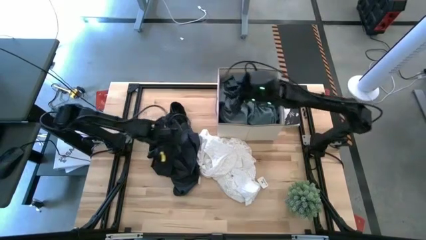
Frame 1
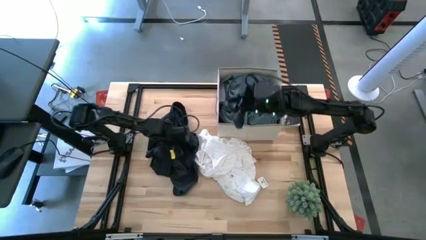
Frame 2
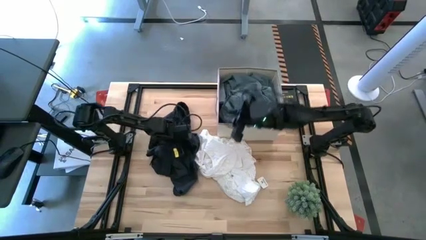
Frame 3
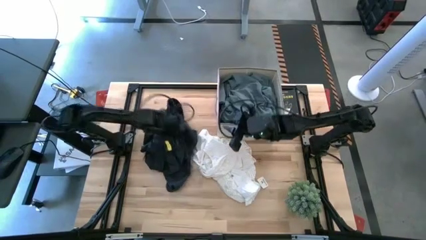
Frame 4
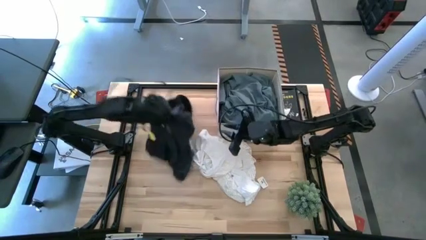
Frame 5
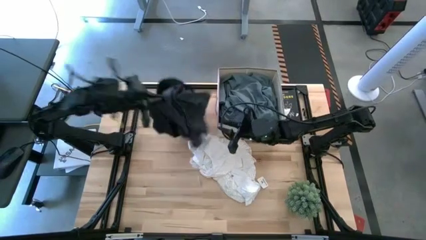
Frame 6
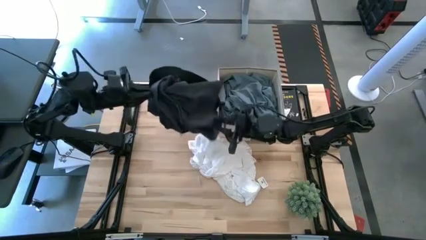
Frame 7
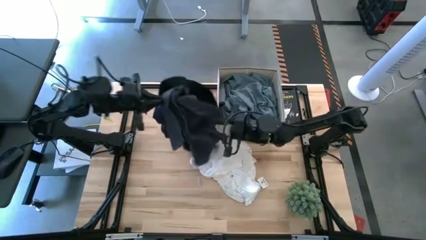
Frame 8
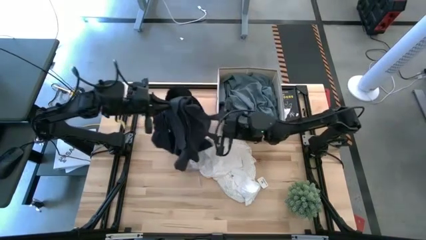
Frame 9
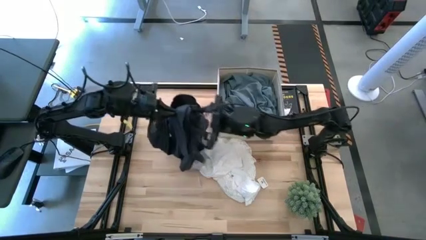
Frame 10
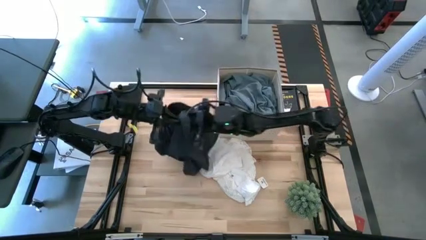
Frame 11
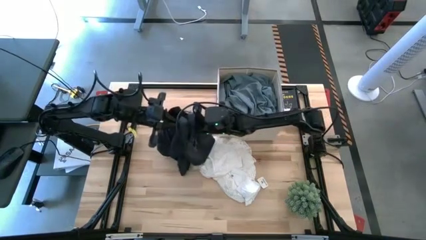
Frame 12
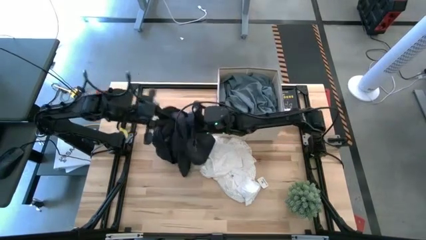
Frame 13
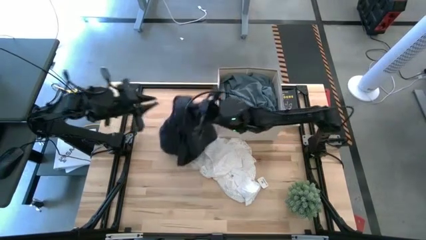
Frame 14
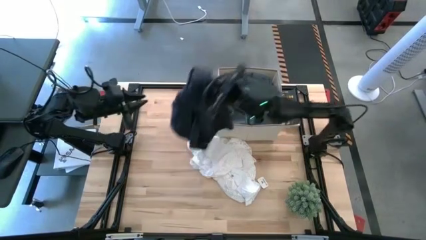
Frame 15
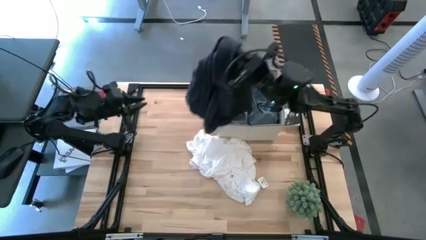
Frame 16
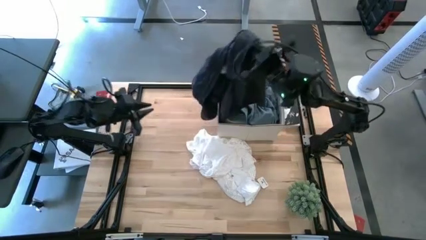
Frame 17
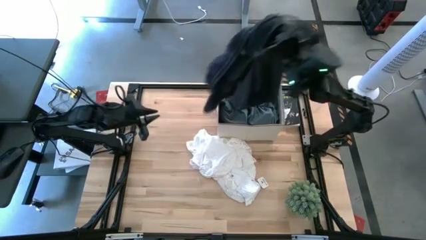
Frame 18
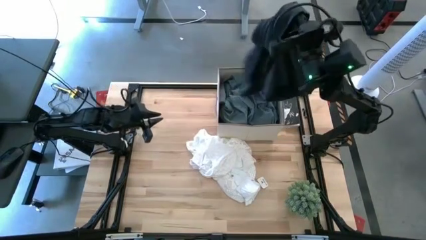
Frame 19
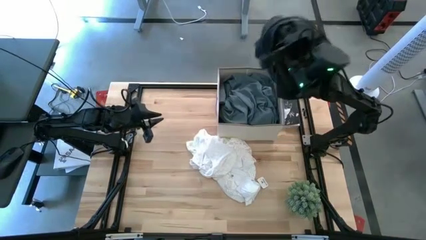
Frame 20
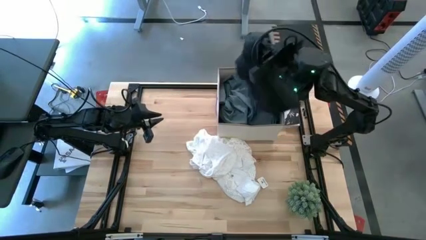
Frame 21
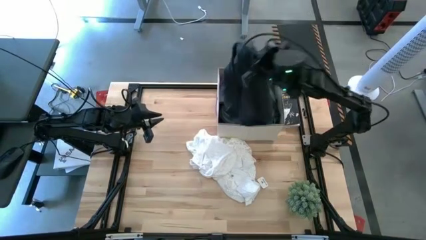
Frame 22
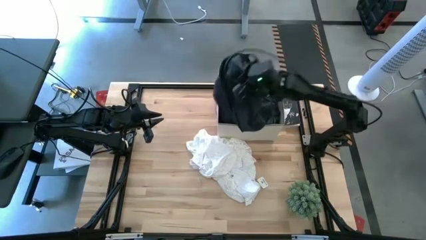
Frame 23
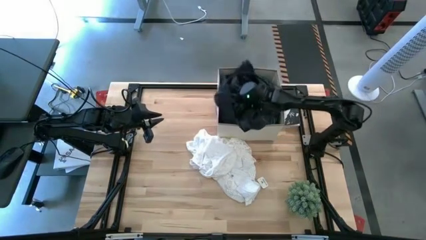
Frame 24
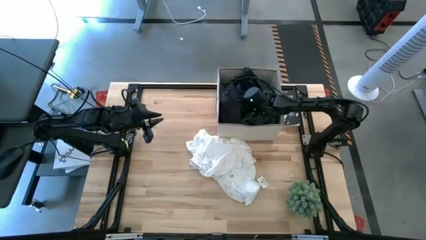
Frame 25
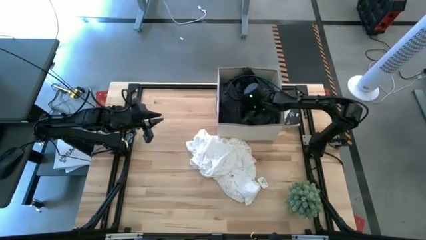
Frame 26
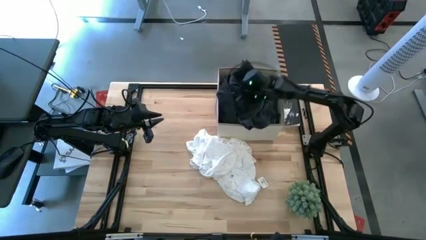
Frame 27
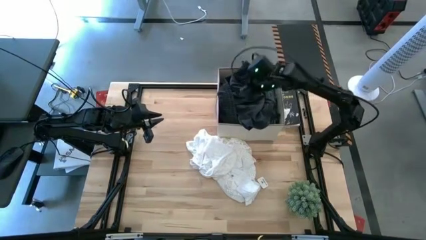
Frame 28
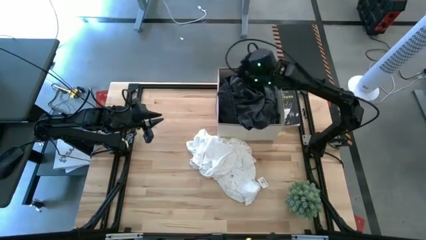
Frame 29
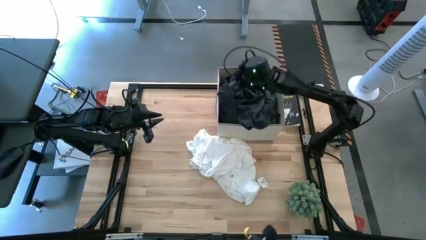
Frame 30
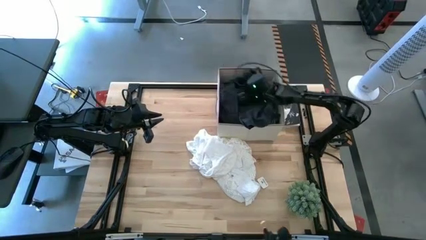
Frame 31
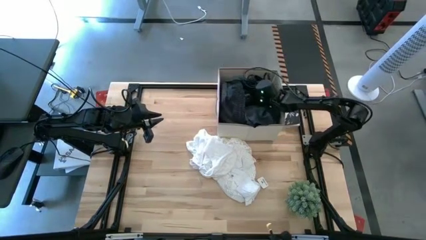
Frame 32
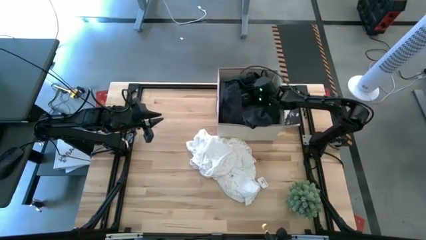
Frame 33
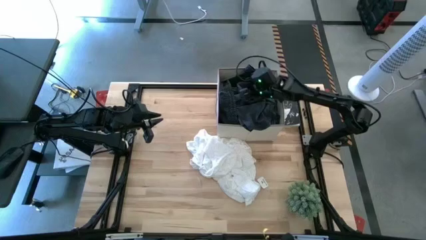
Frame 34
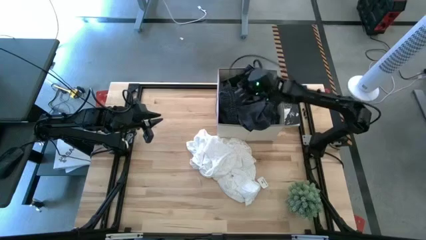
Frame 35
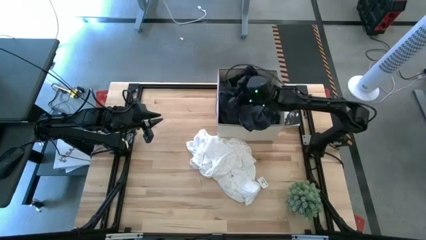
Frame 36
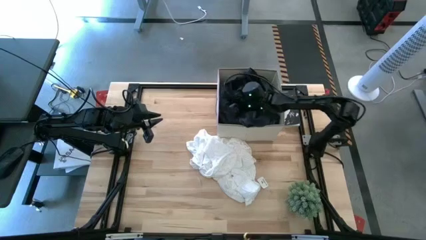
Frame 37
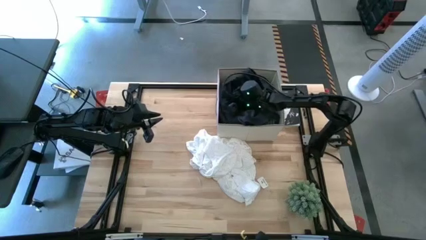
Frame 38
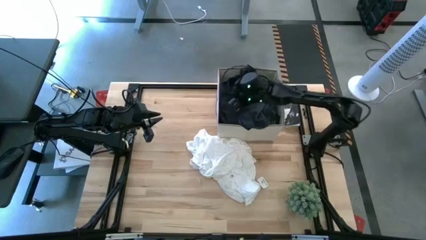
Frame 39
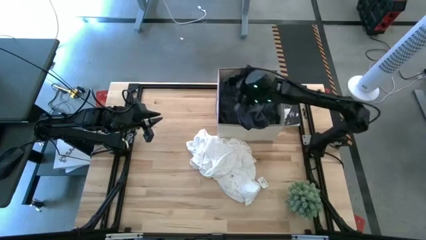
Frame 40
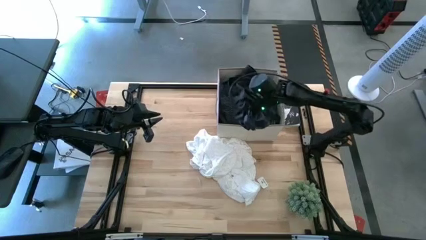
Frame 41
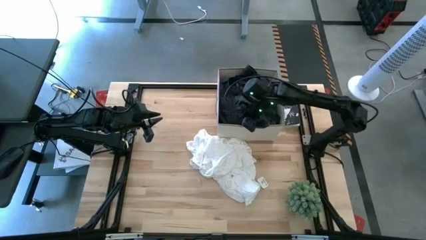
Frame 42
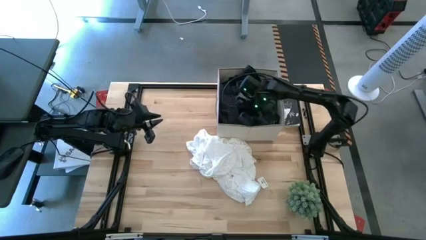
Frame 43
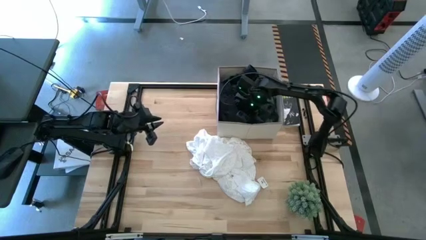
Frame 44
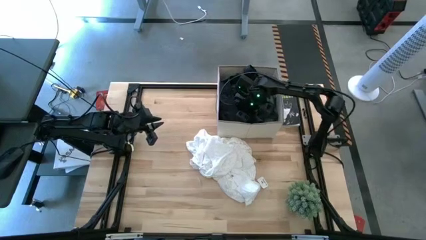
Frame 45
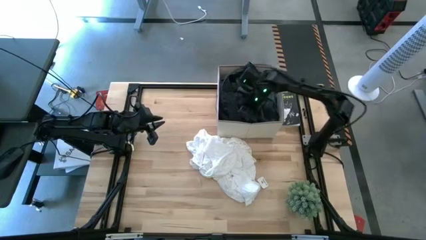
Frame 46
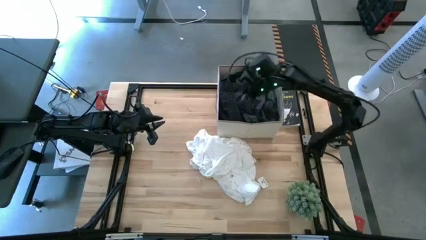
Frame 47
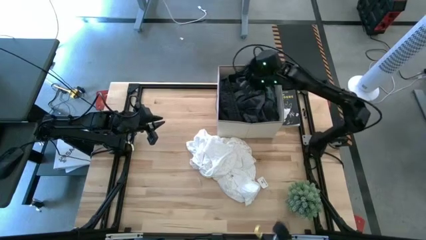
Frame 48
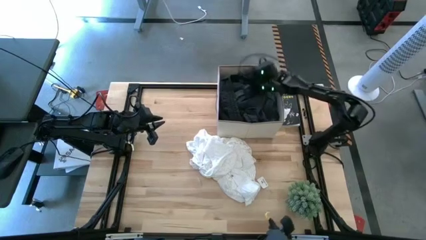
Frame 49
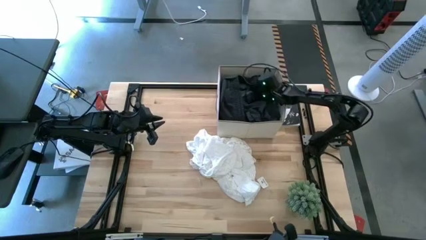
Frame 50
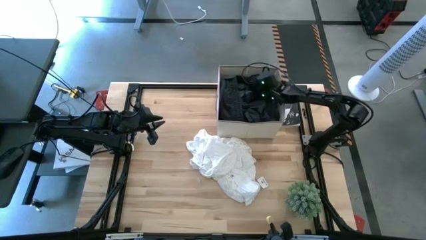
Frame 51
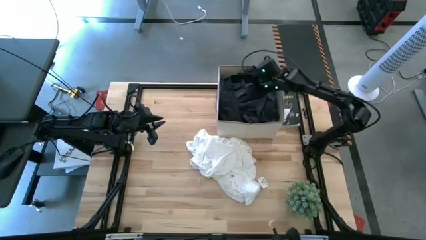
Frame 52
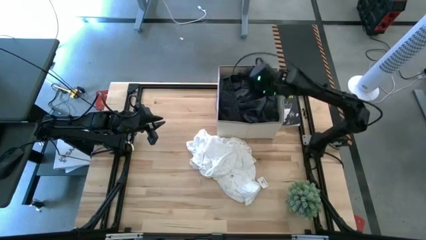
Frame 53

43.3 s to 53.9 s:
Task: Sort clothes
Put the black shorts into the laundry organizer

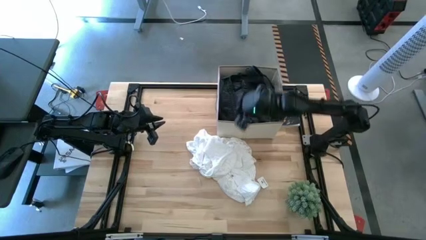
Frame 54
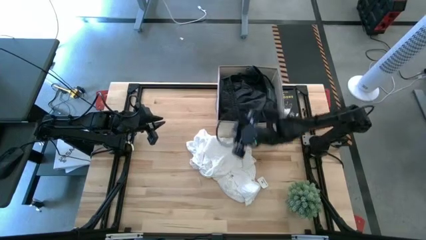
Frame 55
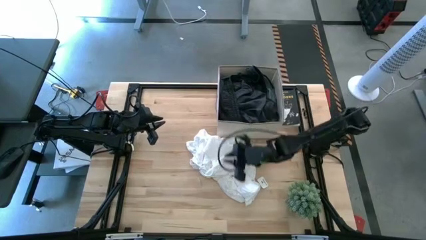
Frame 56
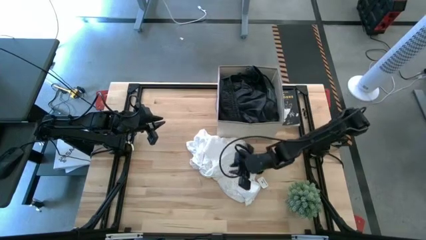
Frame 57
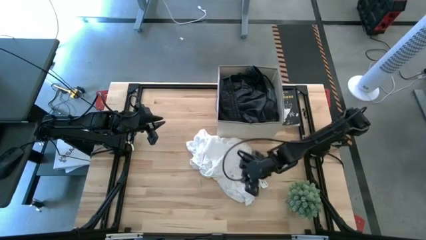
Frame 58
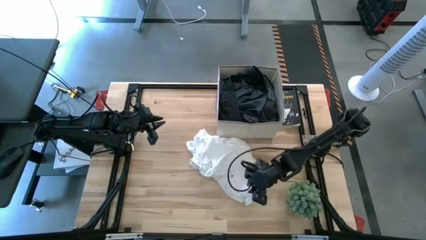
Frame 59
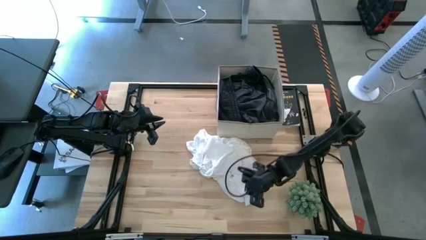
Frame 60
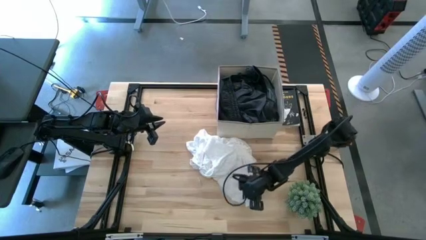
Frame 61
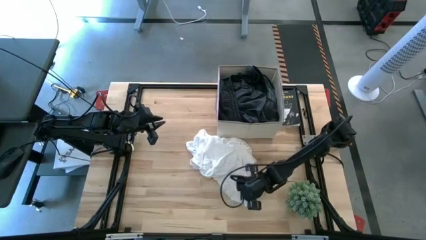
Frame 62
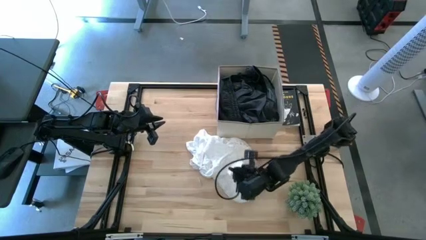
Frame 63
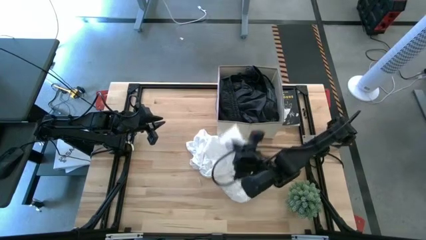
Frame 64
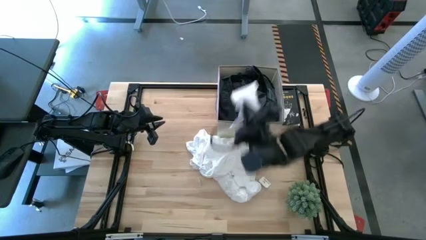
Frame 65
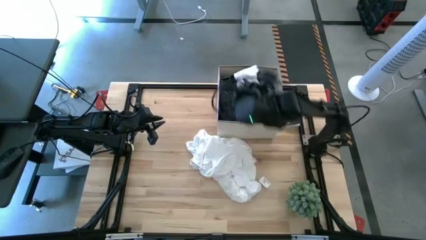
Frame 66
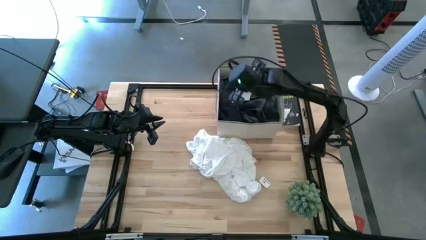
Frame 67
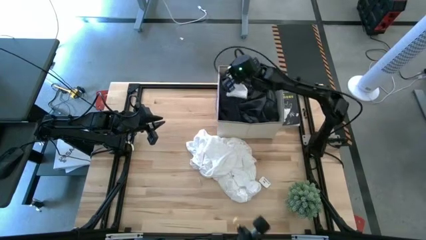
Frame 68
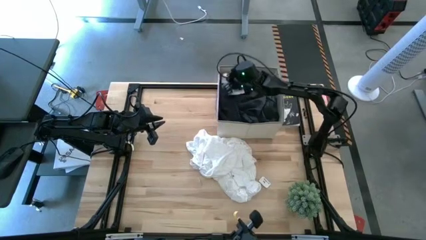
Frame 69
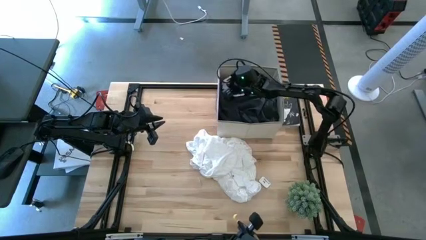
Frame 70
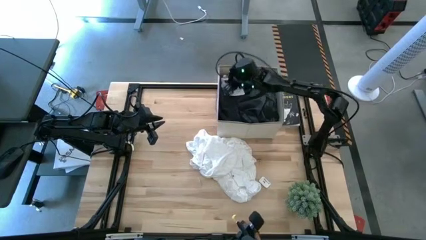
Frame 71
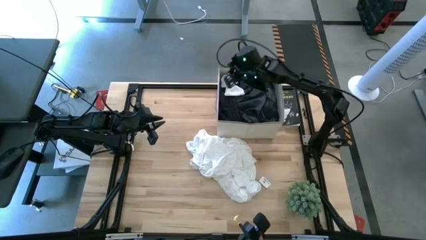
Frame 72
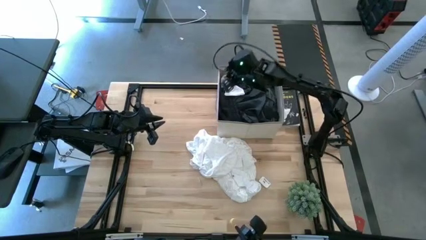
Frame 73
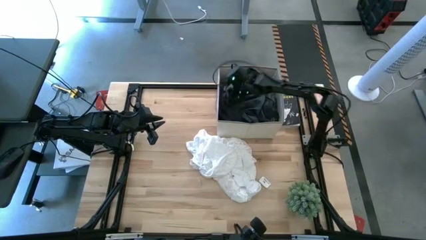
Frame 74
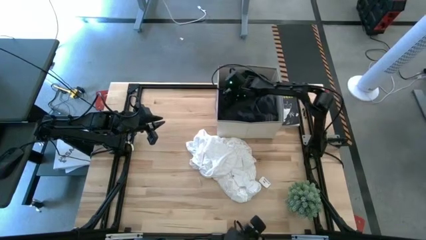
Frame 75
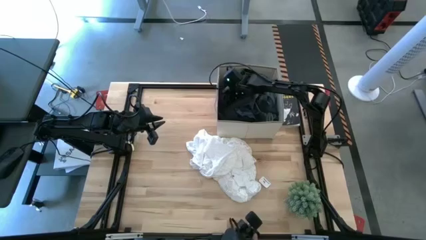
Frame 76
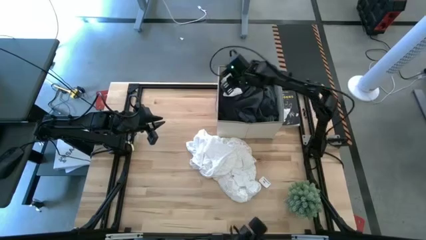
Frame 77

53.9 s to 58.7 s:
Put the white sock into the laundry organizer

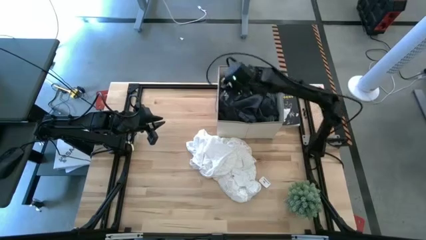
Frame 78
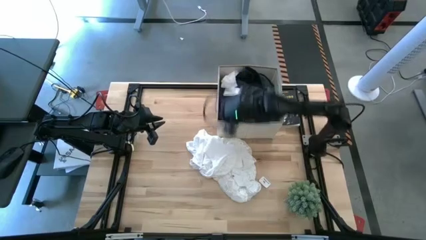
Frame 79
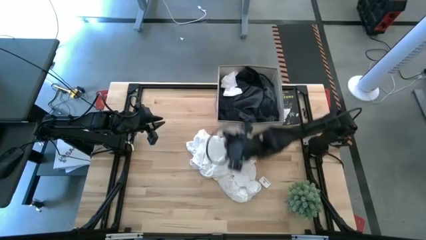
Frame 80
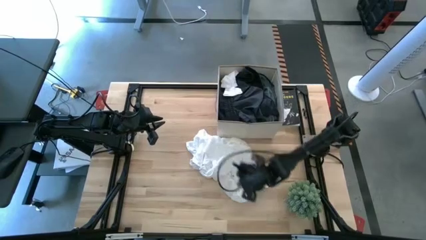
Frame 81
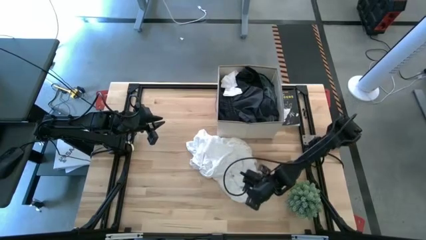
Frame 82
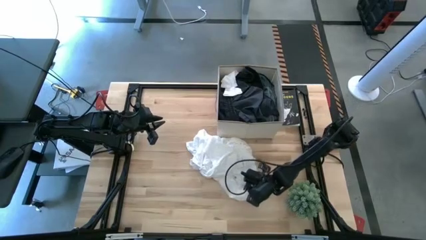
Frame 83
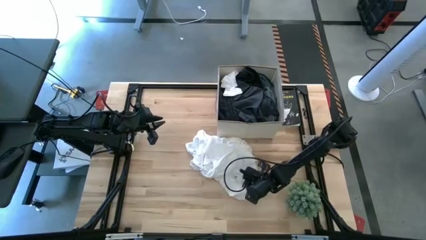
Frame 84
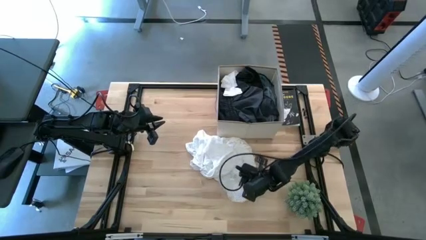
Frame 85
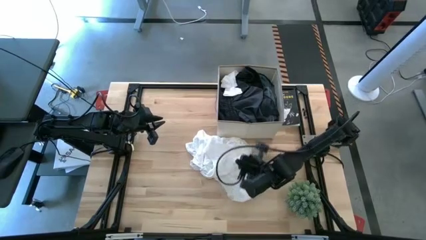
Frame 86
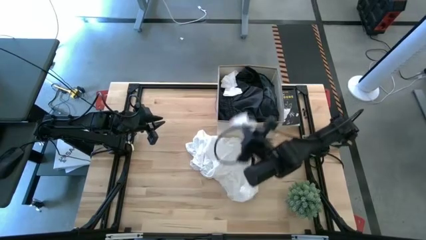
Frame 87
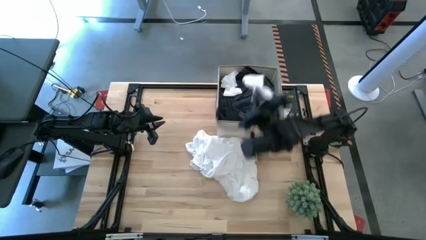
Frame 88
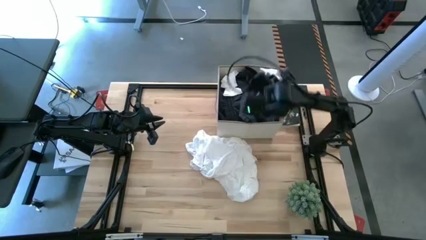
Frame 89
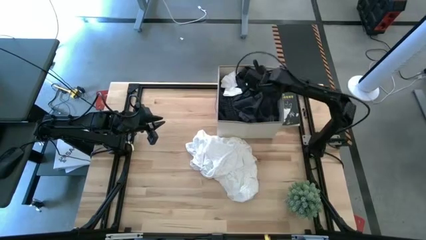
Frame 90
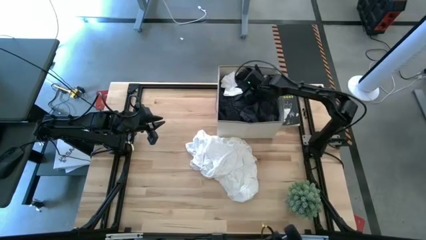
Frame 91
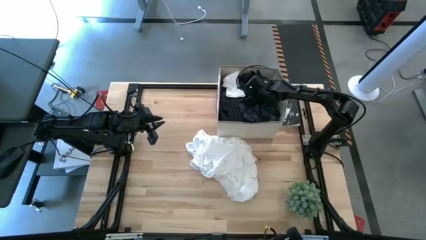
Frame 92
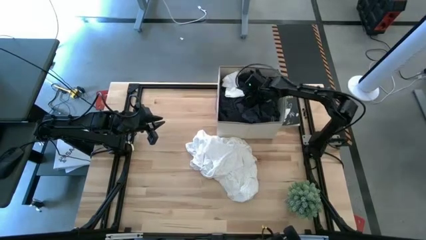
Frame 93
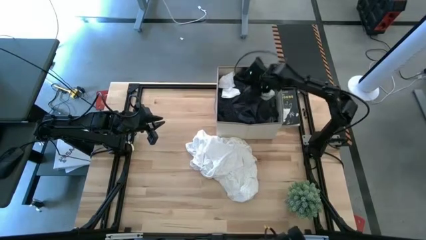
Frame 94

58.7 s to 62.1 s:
Put the white sock into the laundry organizer
